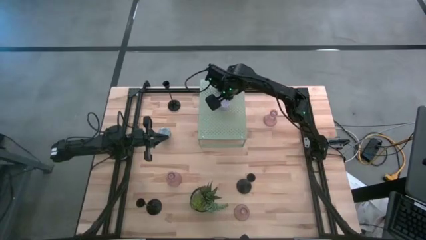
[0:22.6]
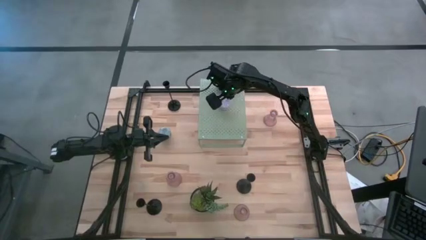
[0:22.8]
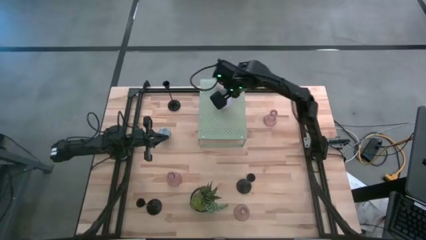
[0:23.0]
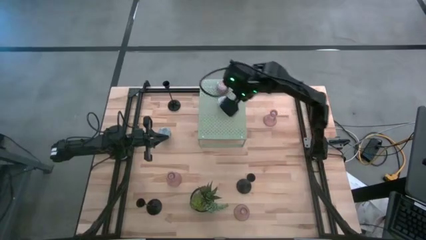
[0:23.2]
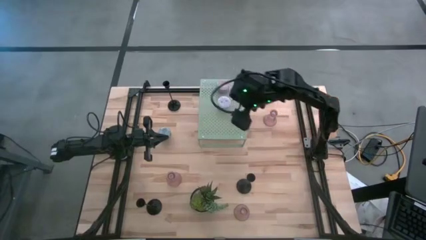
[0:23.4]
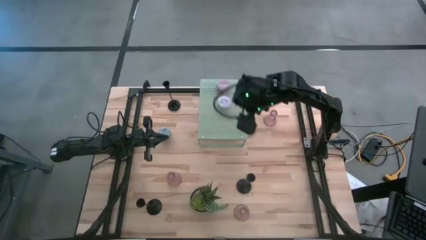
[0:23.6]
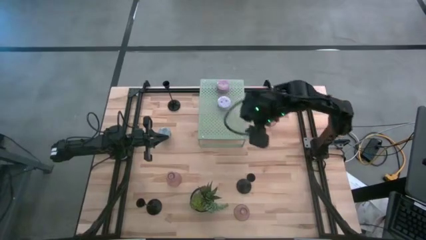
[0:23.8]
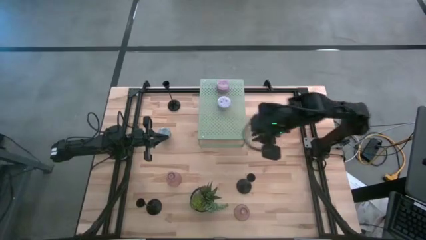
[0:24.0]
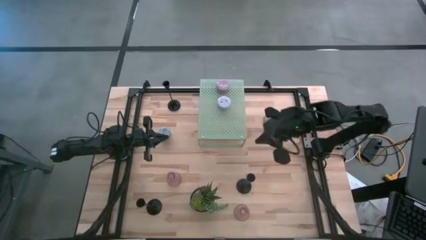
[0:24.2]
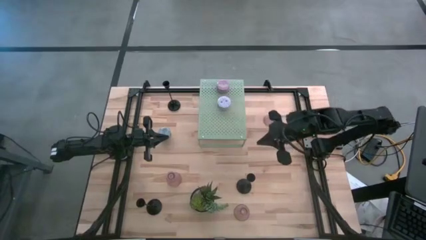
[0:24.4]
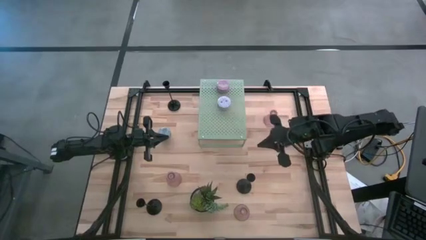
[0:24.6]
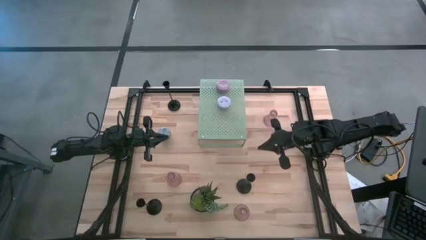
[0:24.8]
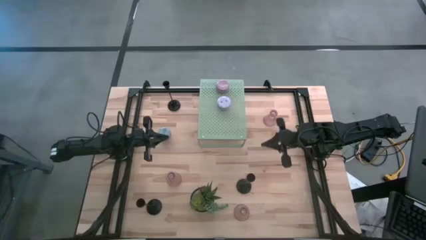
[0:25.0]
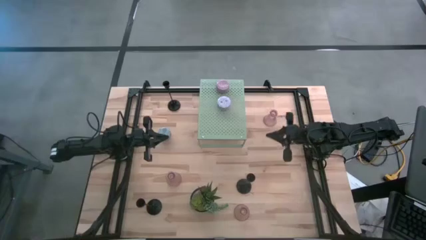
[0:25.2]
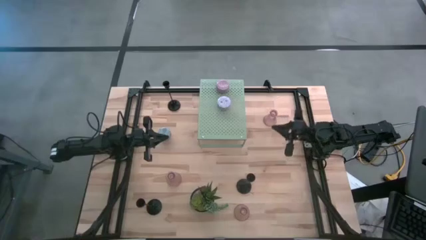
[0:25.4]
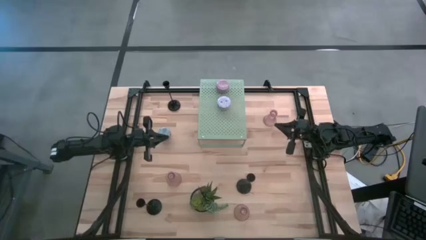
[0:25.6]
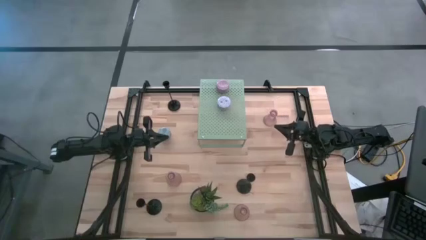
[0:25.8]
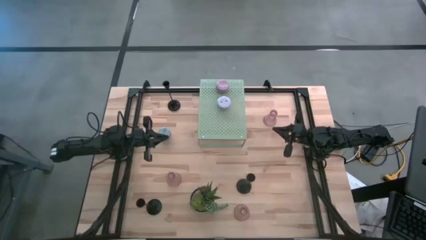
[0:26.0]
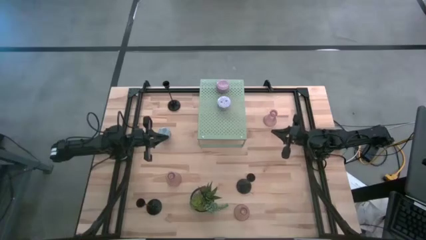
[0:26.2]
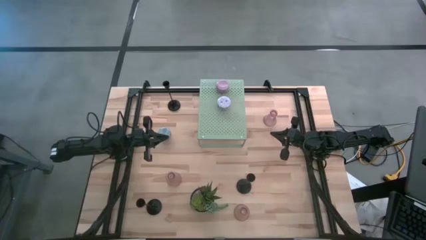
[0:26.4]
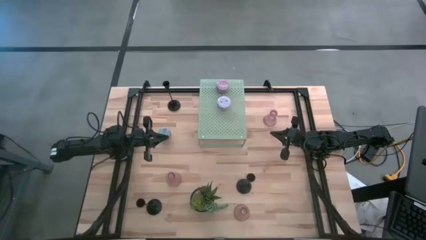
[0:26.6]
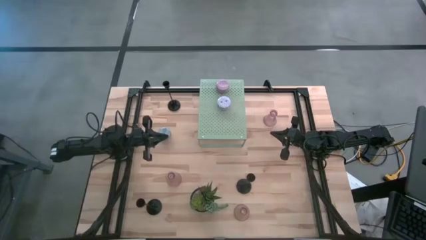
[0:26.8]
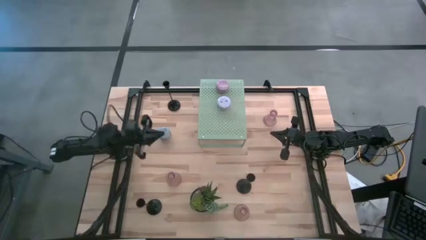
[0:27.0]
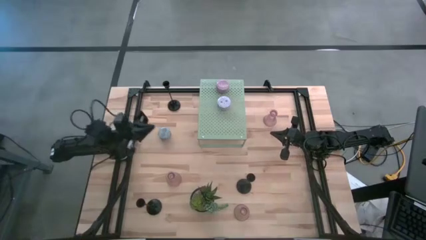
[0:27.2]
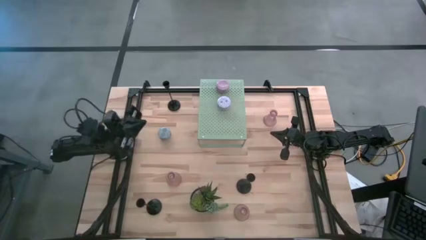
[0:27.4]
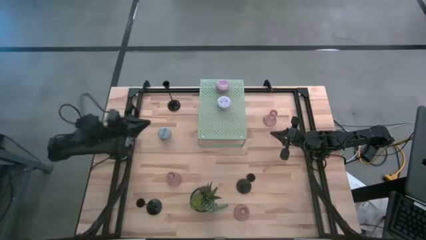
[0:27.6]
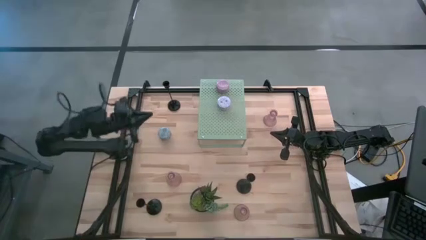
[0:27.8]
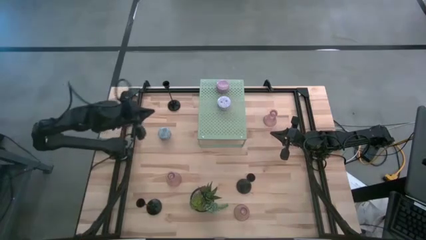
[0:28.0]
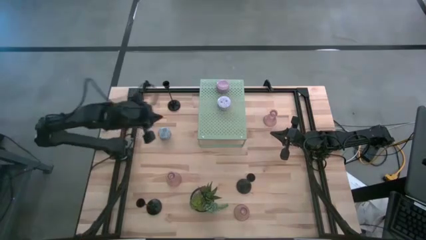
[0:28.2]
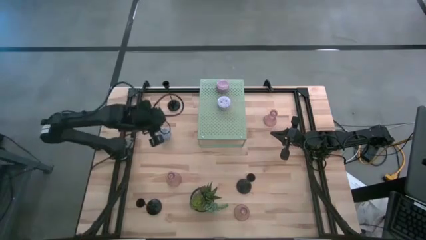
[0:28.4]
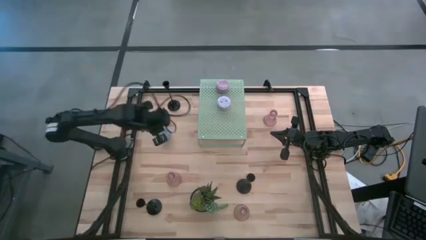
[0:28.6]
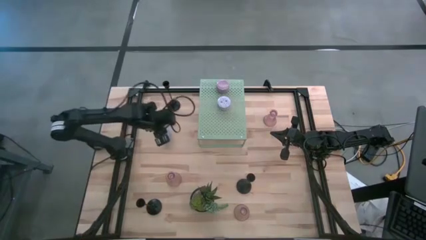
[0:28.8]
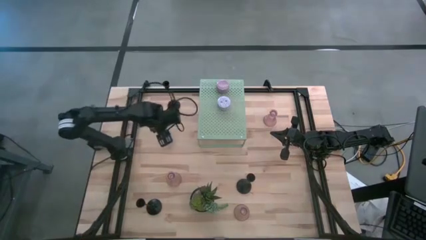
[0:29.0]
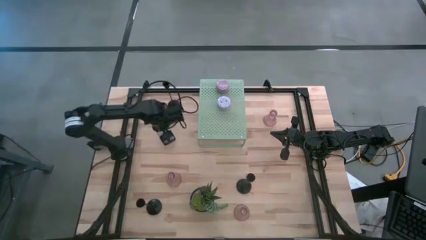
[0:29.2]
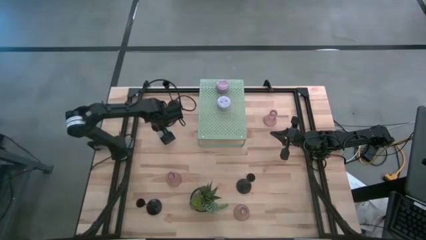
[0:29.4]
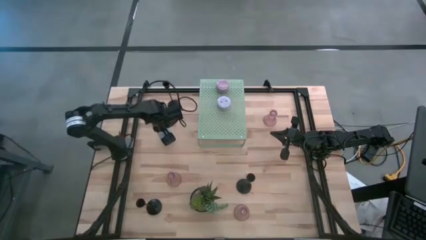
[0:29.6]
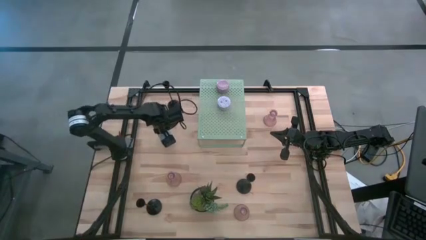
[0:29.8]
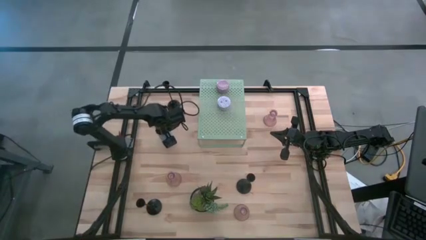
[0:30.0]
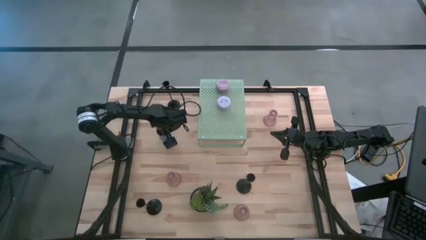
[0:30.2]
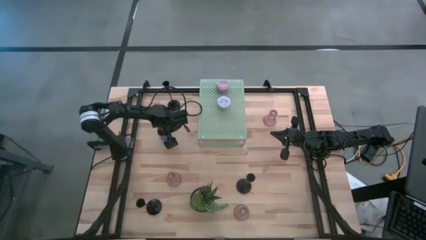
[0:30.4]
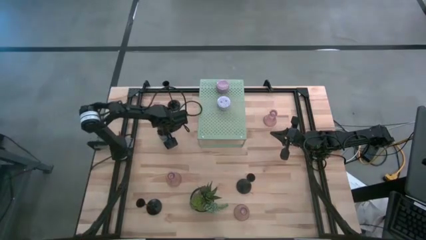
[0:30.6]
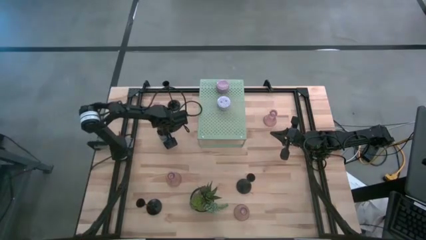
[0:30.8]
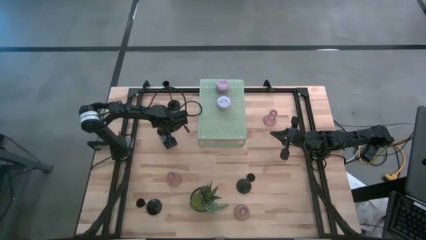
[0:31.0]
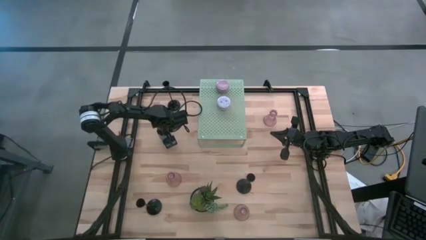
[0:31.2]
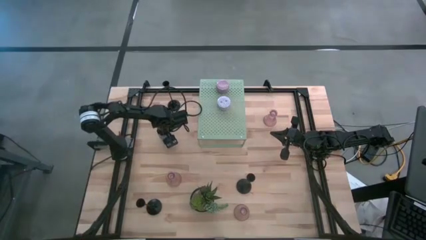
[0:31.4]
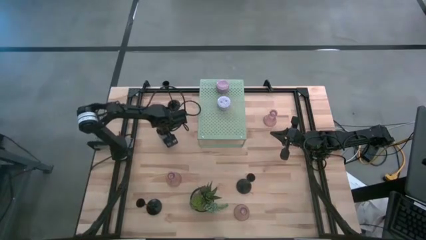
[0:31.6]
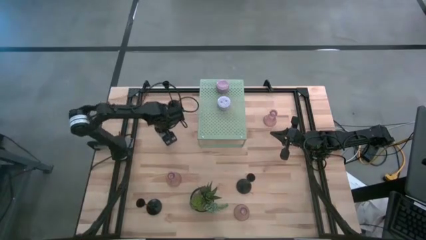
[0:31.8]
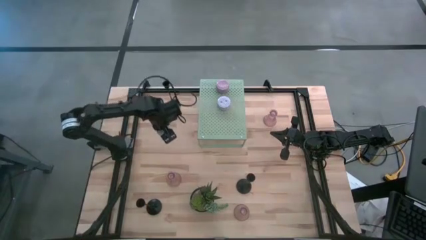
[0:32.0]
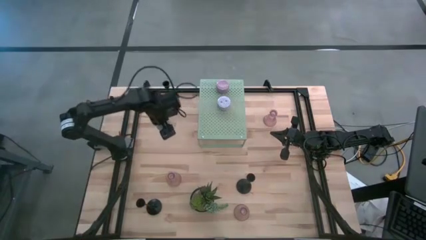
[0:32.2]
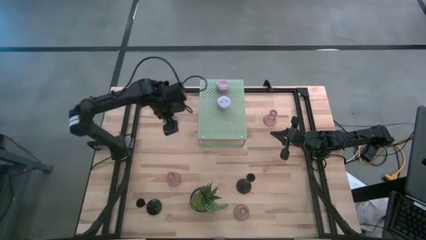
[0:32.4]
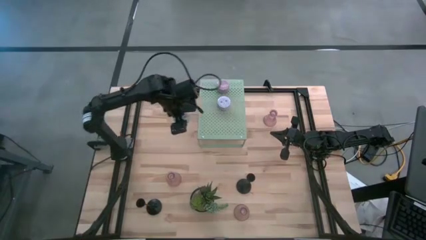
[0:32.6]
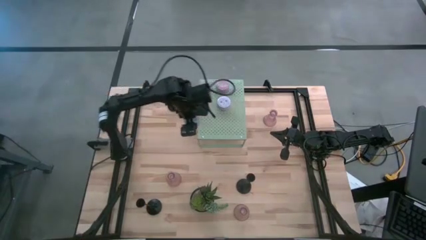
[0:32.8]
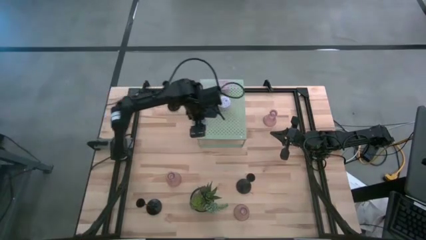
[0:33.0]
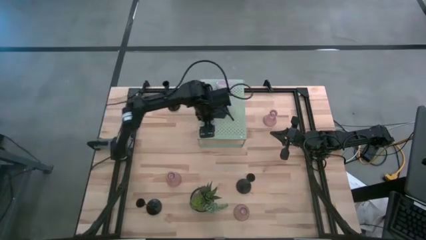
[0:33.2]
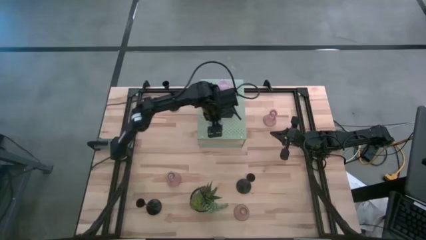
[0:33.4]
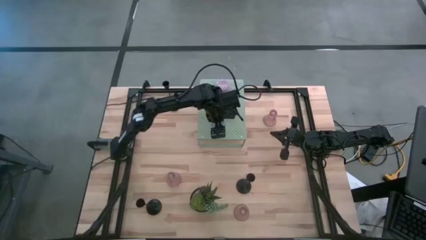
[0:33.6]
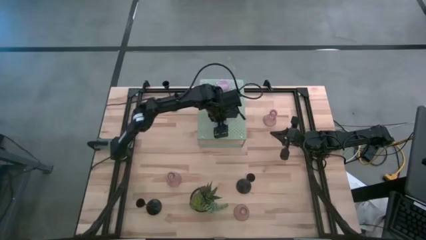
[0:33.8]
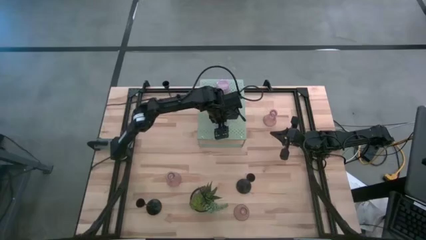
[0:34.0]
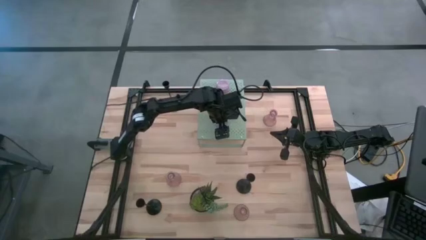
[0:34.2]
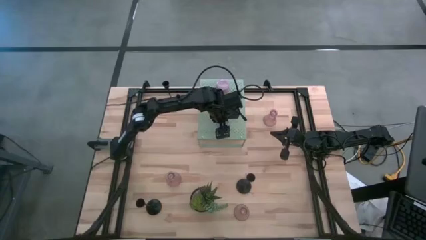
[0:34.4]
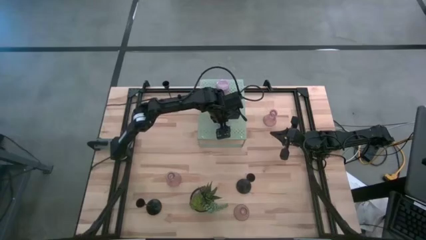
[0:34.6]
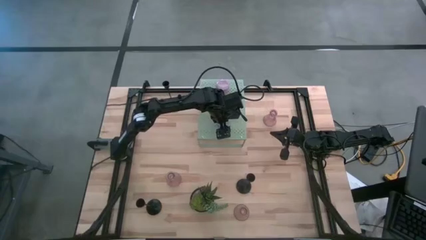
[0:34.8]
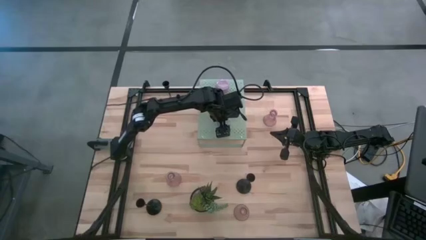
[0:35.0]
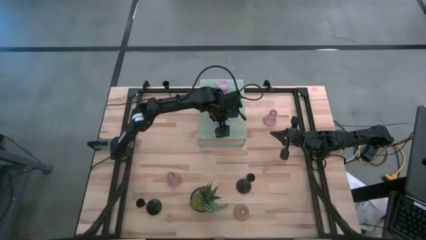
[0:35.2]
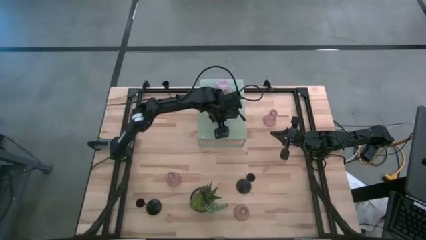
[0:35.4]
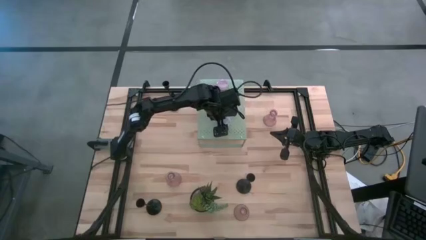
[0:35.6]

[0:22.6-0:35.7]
Task: Pick & Place candle stick holders
Put the blue scented candle on the shelf aligned with the pink and white scented candles

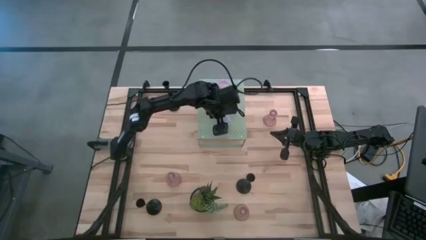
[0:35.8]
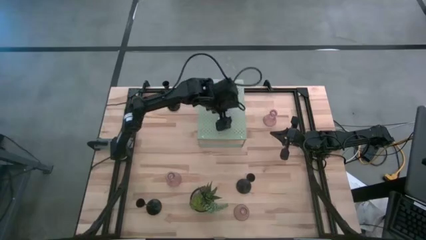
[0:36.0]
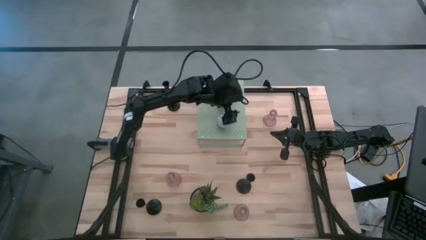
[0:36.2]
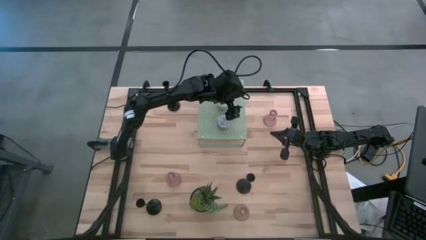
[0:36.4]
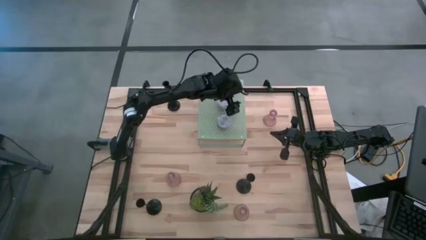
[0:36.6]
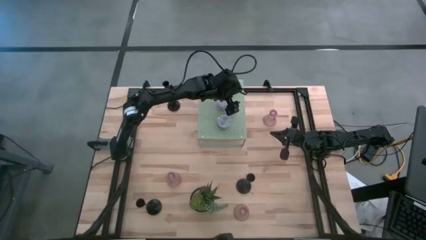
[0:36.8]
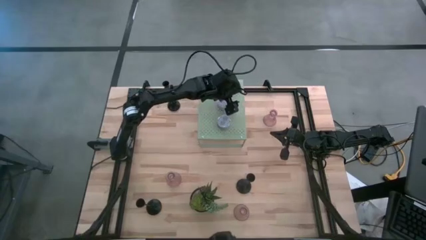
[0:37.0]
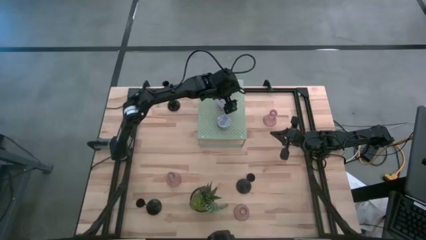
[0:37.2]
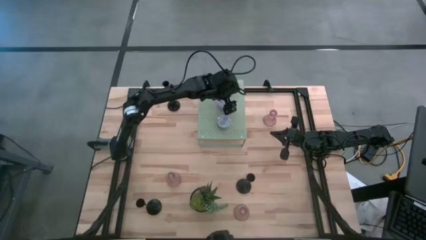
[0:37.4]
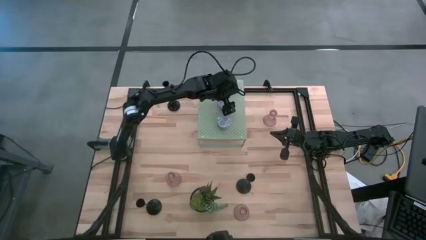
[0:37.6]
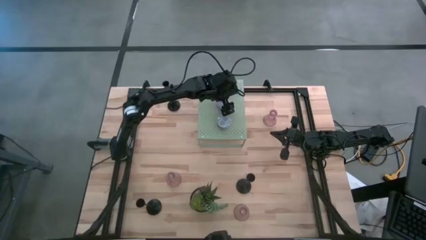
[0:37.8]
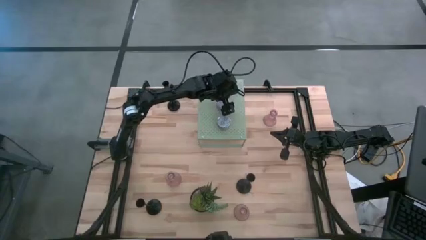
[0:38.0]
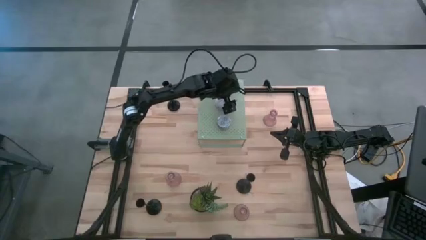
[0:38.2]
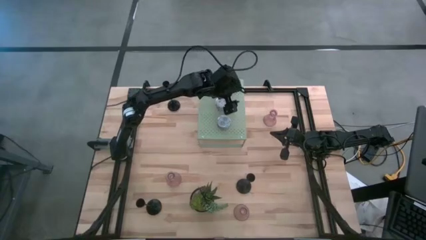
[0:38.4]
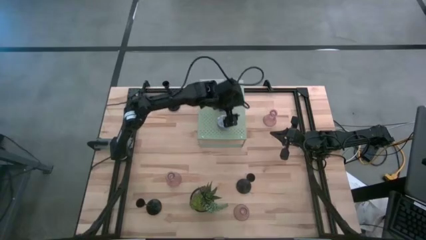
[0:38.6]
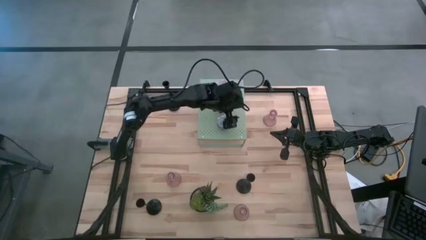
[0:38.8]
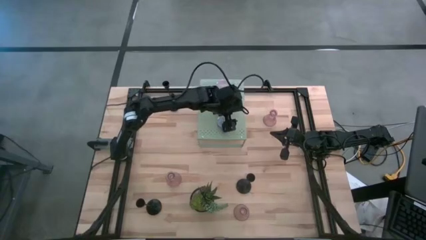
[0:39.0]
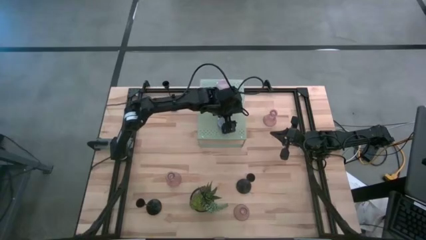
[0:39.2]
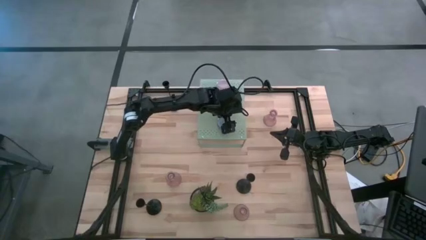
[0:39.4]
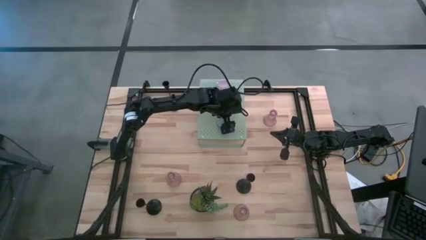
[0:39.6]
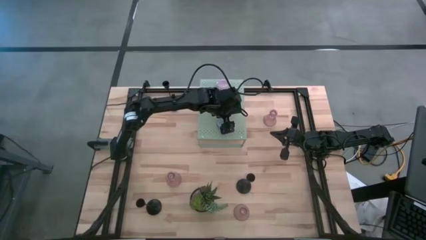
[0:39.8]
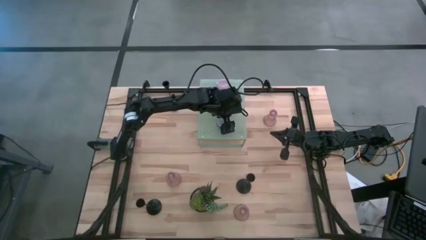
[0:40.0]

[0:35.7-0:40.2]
Adjust the scented candles on the shelf
